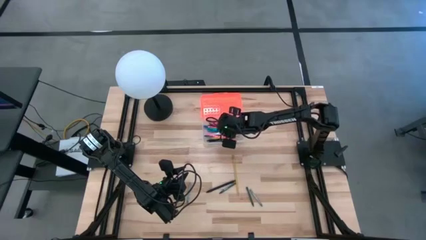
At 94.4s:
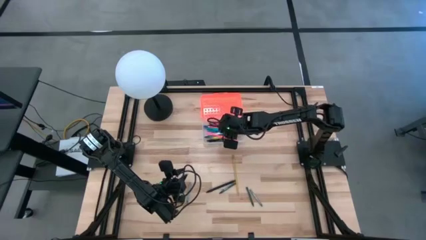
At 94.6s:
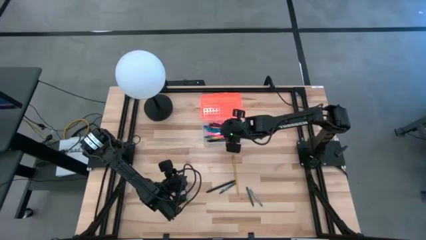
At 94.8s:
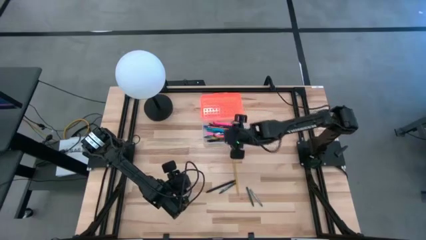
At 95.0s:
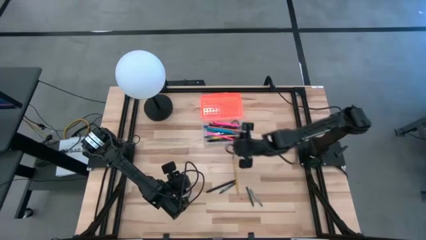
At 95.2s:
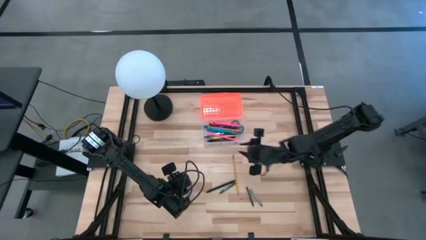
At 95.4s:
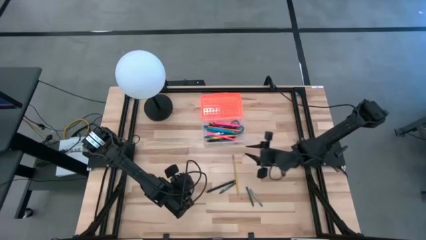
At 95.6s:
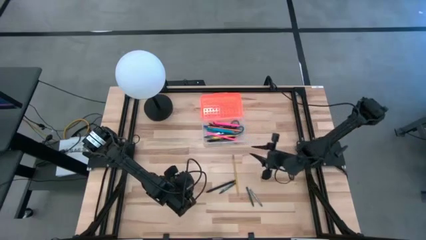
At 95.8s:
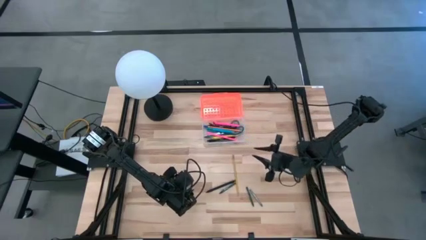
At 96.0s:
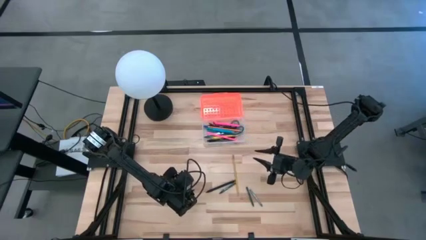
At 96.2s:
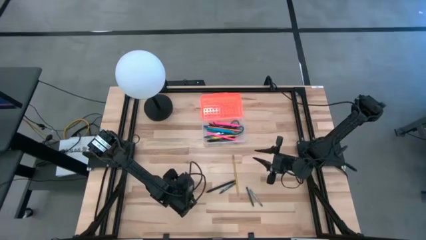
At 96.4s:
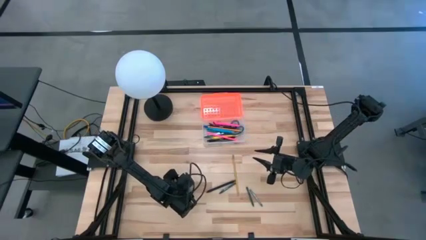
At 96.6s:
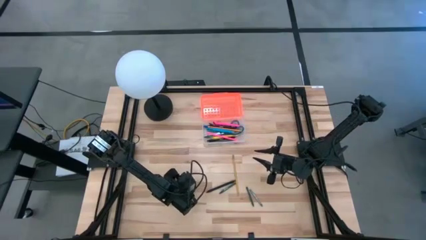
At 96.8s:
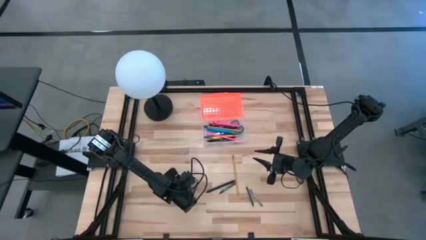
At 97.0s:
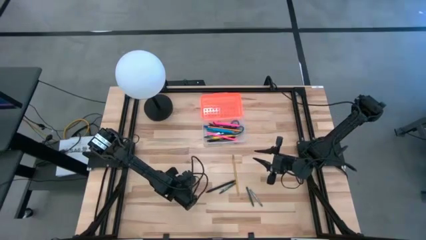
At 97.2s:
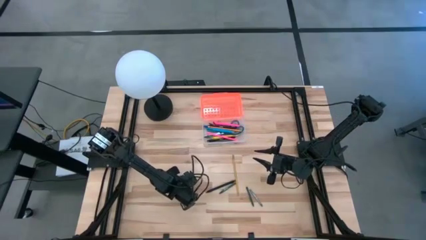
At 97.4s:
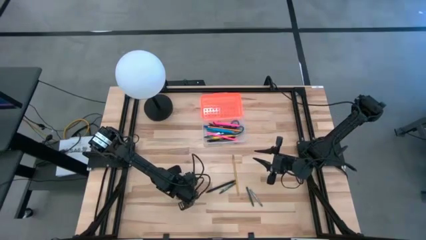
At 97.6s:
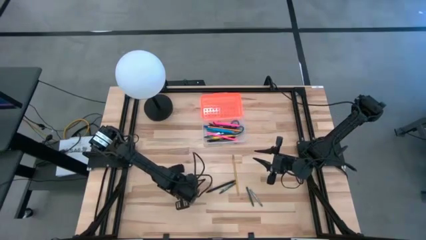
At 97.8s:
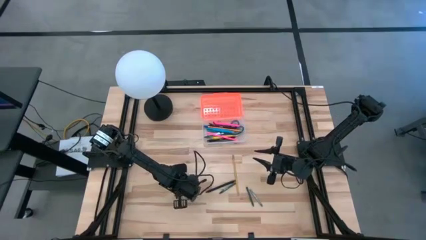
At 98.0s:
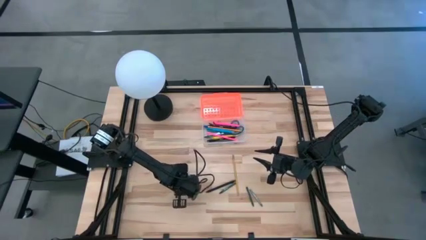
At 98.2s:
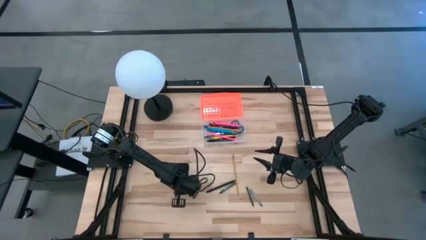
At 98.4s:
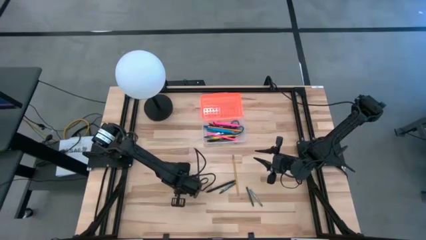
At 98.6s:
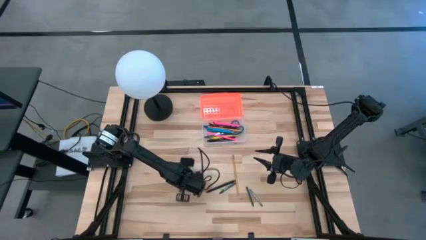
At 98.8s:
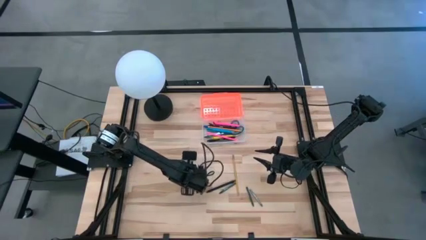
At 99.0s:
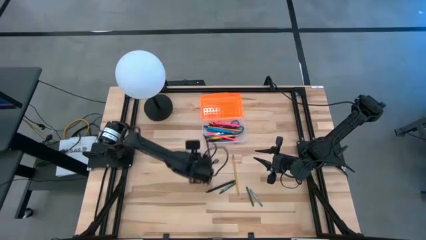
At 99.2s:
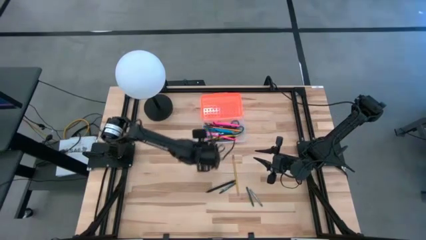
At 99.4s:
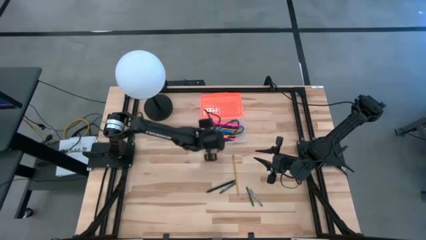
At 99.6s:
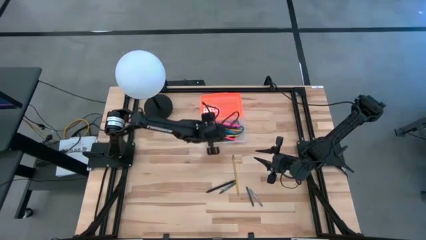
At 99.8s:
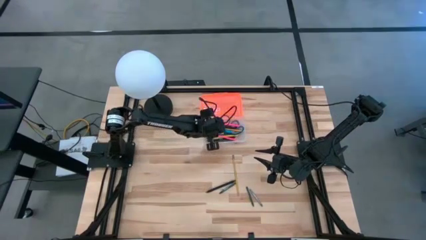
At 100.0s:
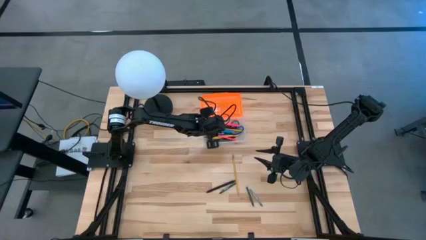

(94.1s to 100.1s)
Task: Pick & place school supplies into a supply box
Put the gray crayon into the orange supply box

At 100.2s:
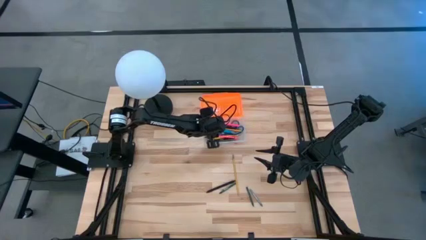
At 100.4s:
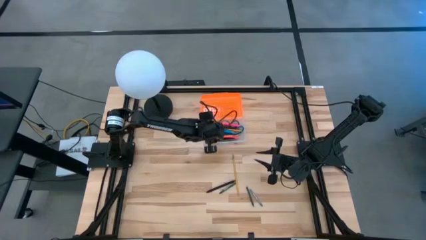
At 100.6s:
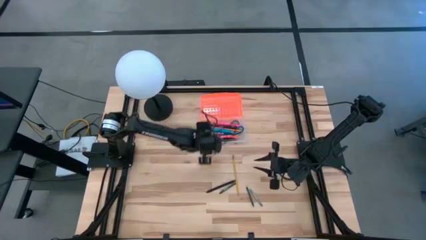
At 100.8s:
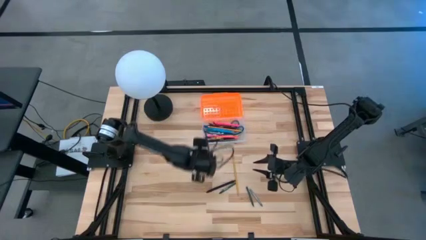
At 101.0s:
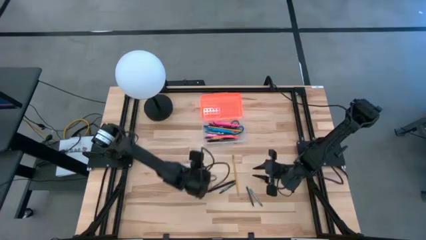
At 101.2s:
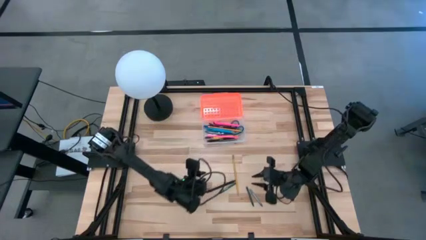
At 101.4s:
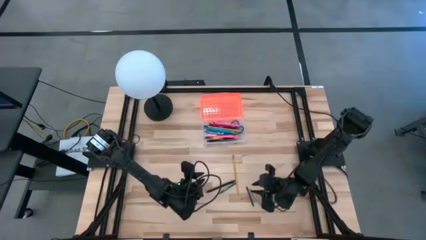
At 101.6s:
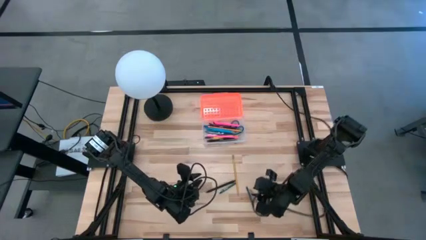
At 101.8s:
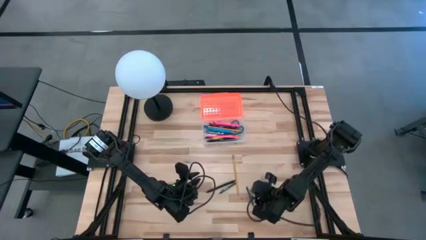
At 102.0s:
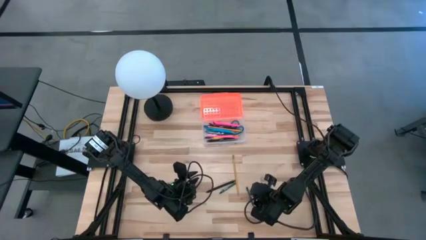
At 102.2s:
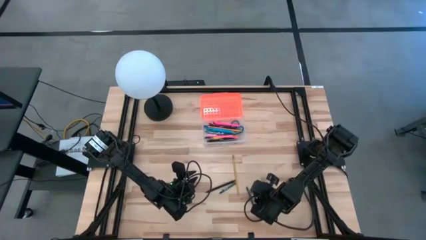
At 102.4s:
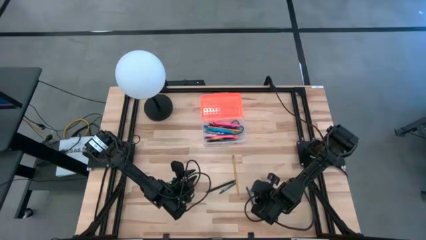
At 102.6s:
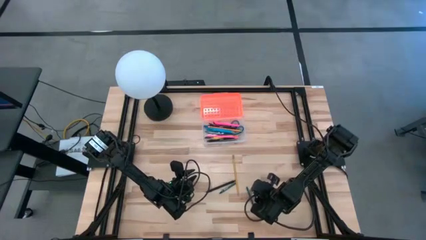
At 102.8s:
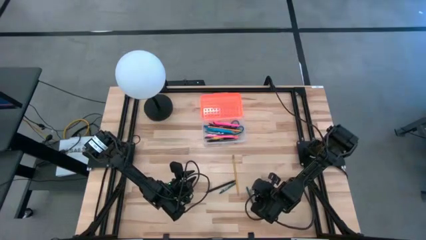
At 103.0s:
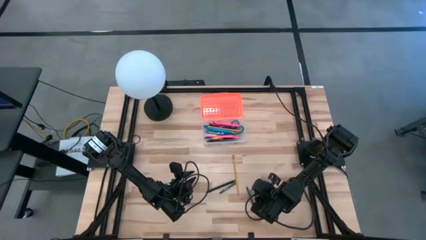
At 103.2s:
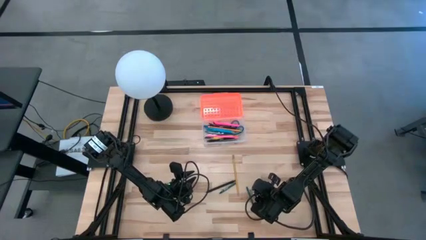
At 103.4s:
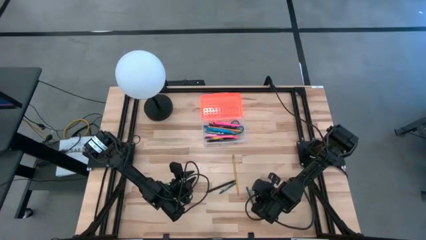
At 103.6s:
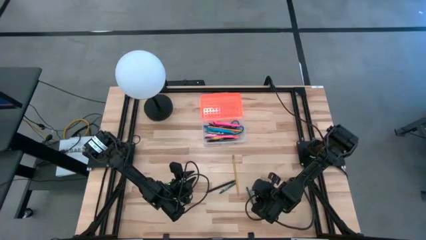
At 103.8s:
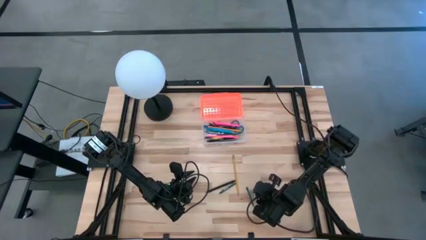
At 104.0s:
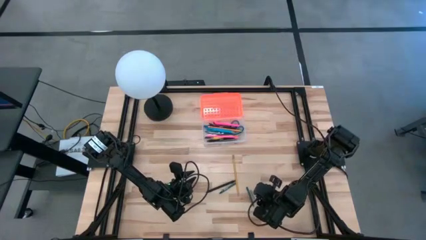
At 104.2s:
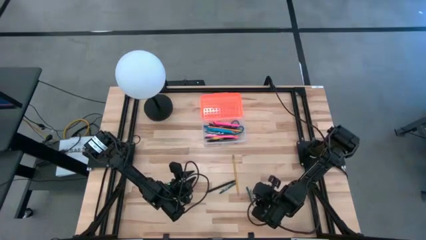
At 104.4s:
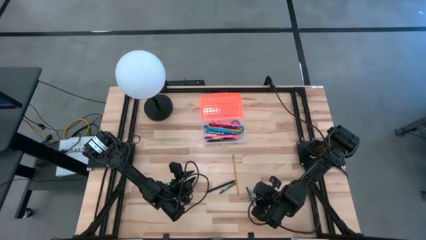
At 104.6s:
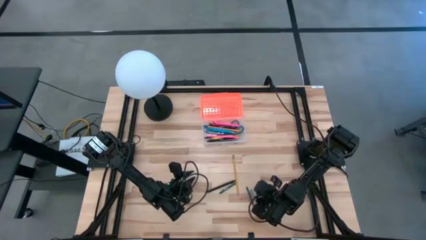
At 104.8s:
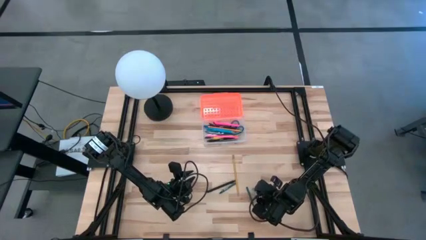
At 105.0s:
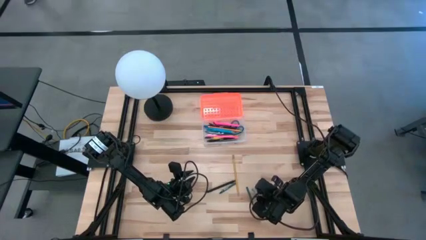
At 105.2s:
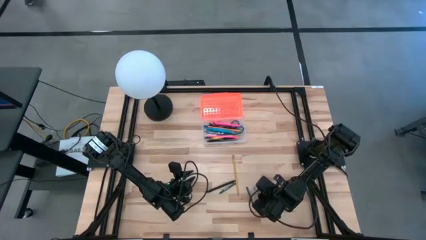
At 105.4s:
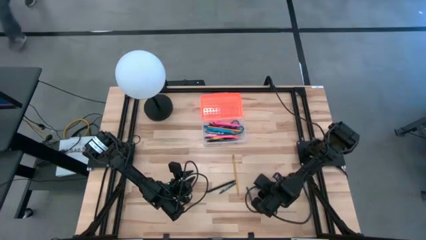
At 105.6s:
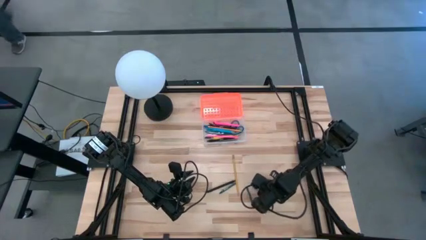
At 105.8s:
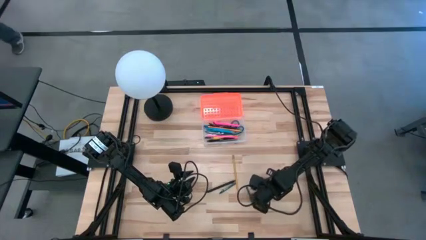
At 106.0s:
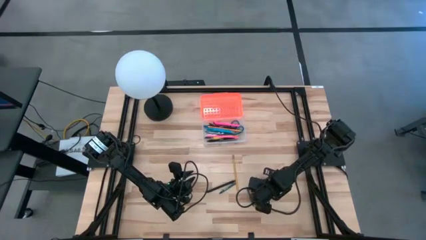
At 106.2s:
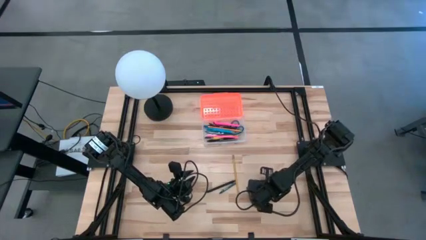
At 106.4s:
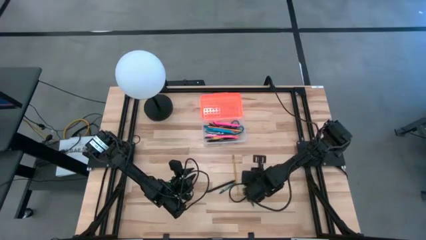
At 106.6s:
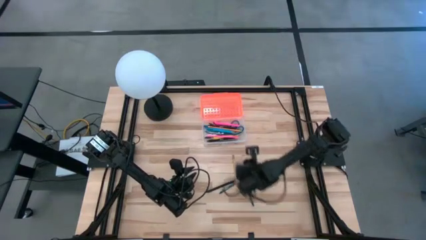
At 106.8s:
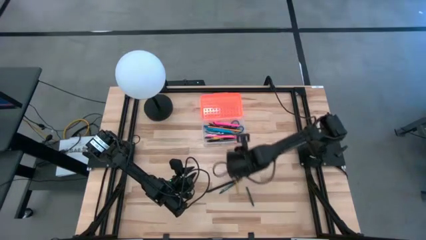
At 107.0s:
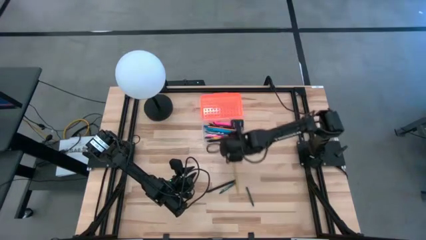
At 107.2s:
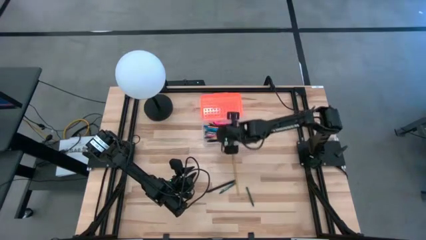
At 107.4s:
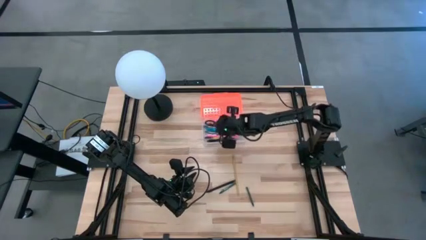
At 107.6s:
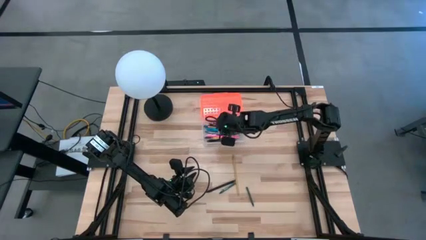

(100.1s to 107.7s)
Put the gray crayon into the orange supply box

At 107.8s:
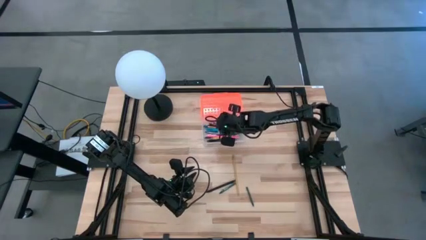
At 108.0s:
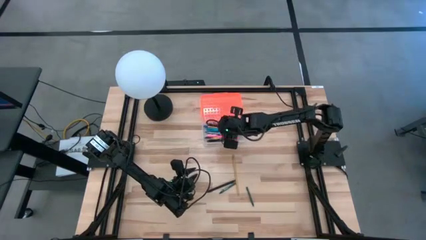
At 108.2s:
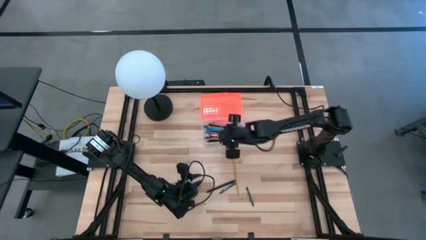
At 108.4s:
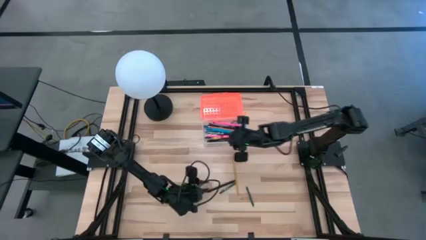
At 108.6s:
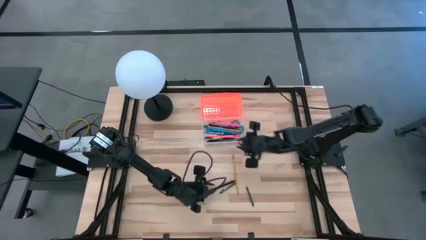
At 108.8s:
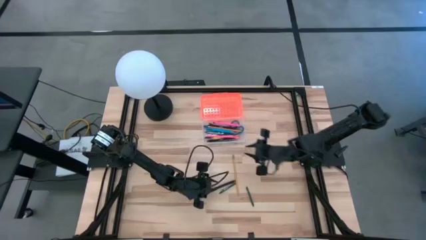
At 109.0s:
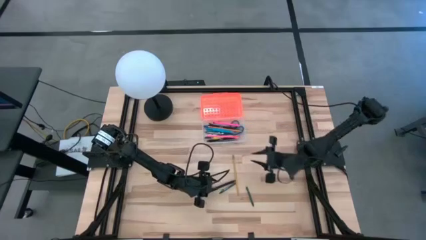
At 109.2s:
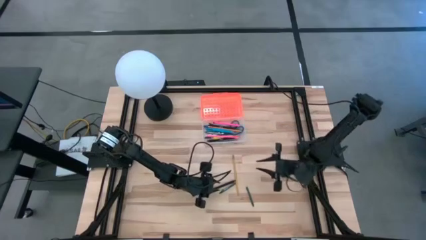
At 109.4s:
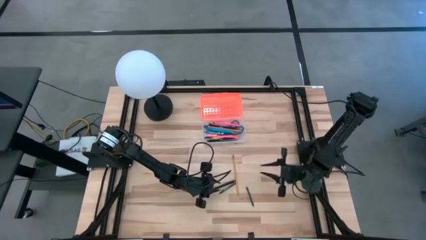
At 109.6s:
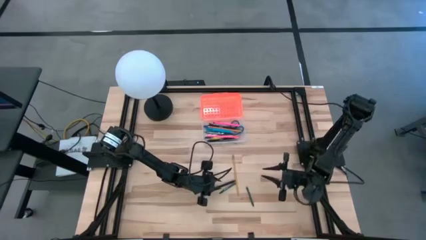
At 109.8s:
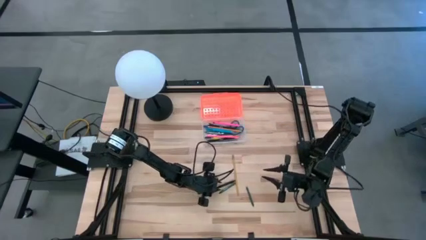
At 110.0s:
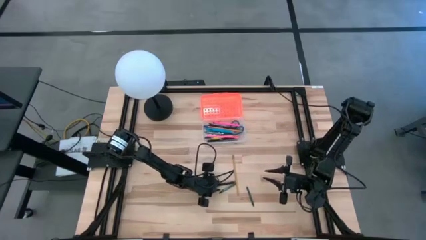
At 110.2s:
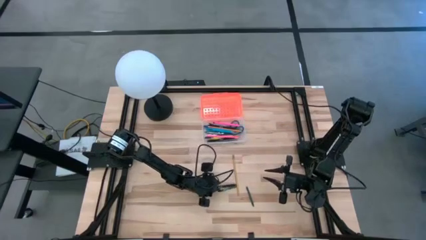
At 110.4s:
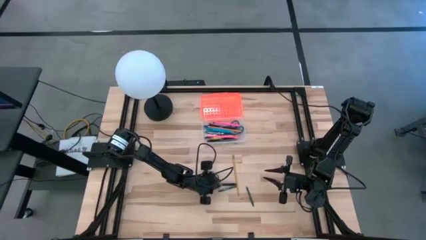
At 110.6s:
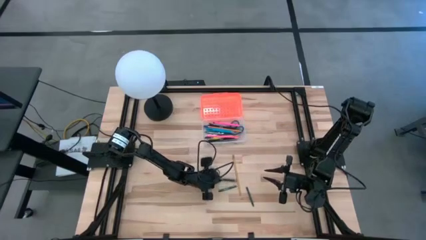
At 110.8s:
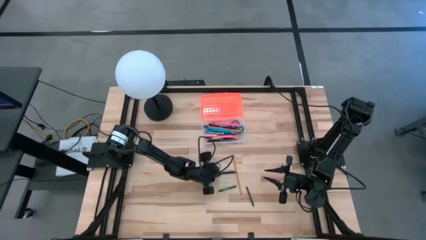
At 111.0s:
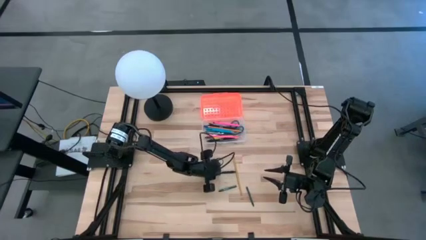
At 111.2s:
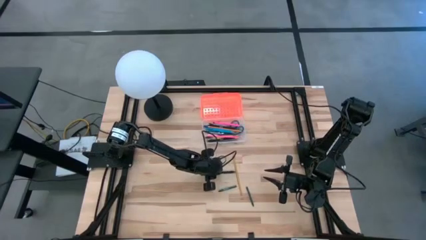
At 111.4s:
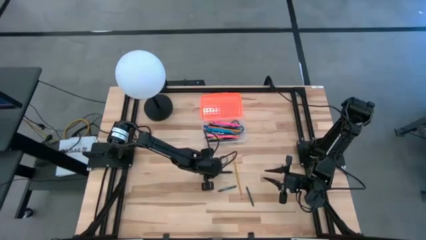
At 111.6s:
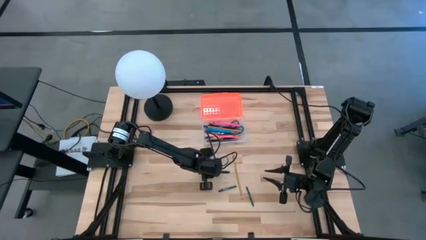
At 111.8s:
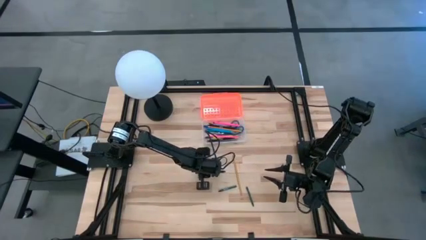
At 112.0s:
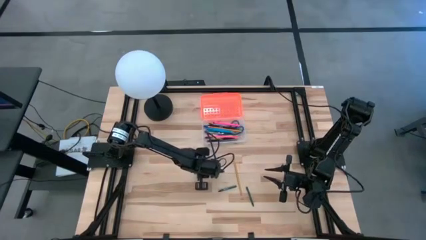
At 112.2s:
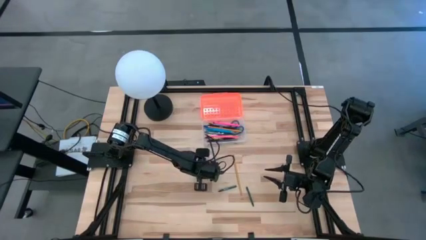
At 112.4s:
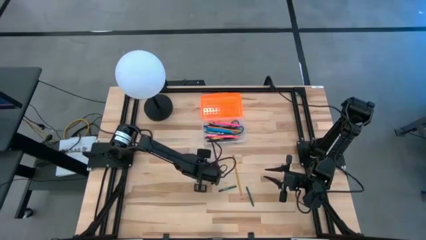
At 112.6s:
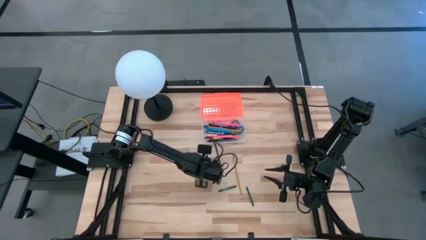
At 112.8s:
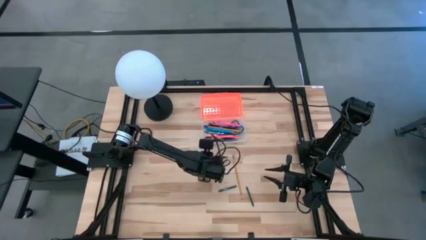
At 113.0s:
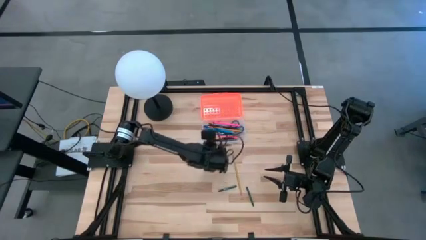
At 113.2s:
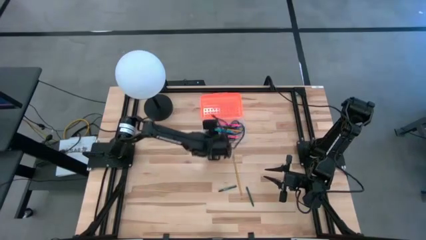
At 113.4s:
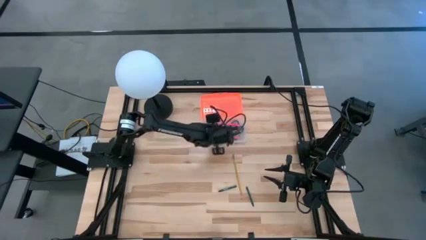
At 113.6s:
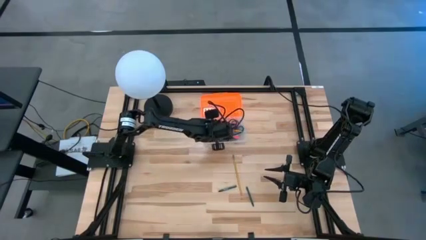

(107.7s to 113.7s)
Put the black pen into the orange supply box
